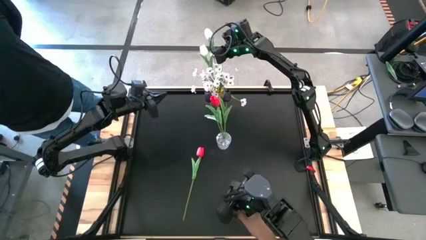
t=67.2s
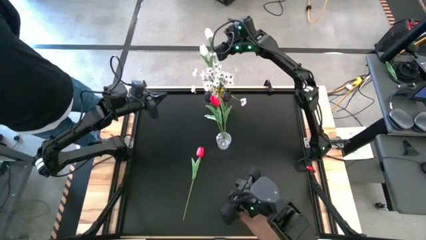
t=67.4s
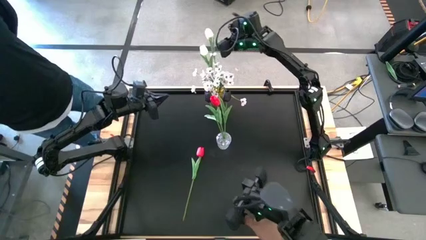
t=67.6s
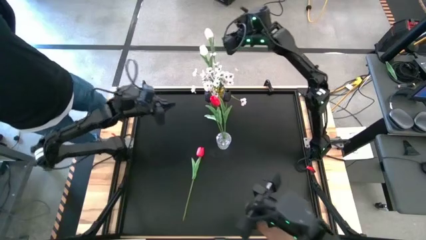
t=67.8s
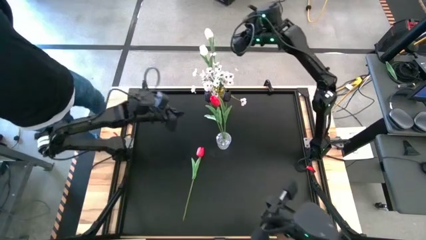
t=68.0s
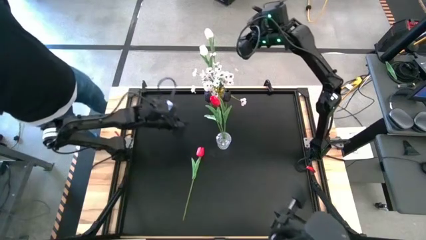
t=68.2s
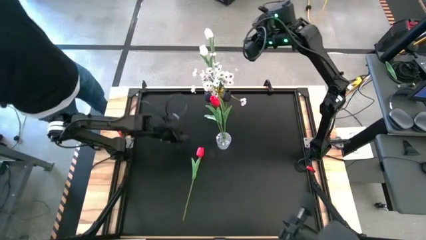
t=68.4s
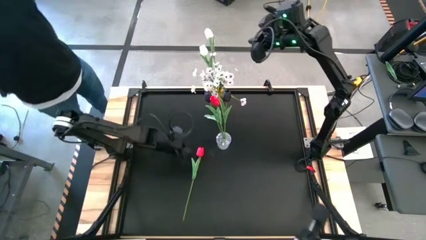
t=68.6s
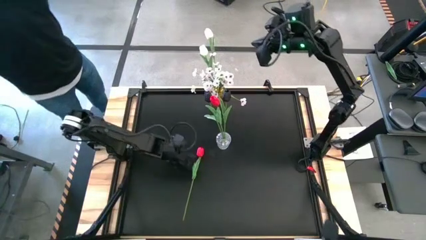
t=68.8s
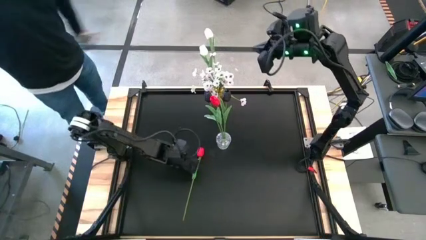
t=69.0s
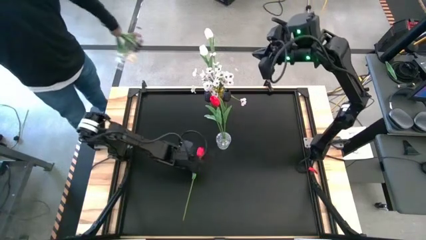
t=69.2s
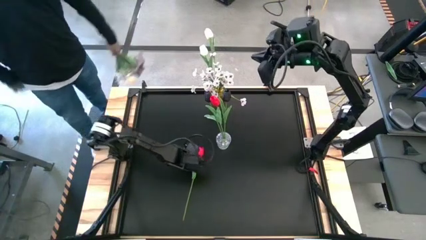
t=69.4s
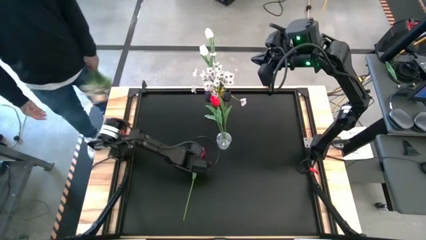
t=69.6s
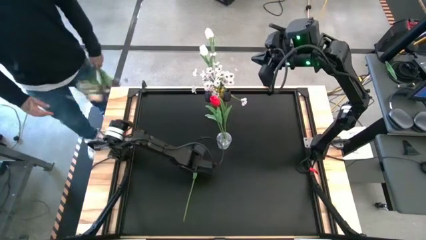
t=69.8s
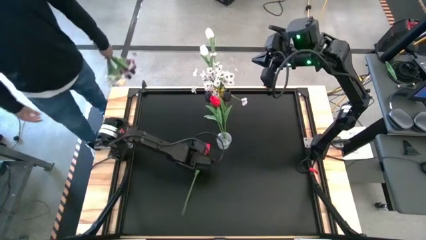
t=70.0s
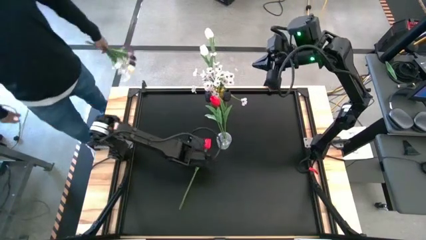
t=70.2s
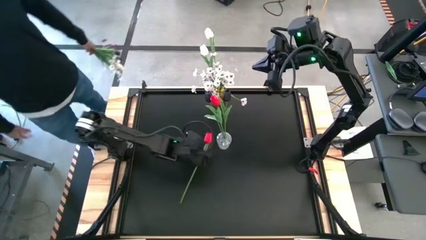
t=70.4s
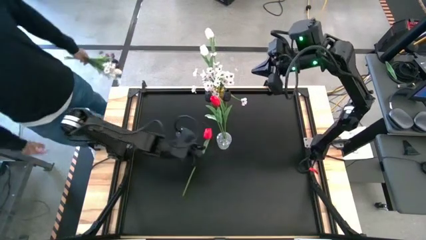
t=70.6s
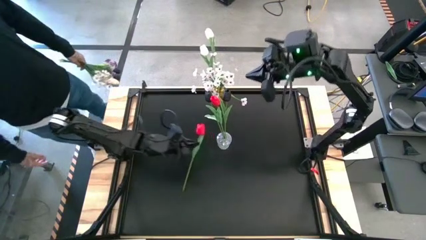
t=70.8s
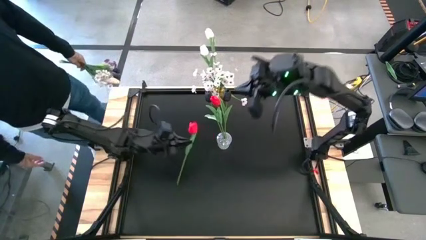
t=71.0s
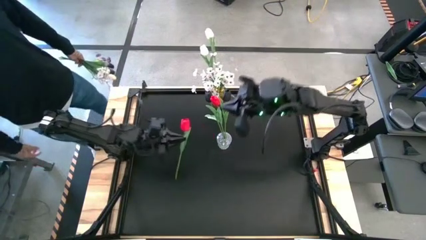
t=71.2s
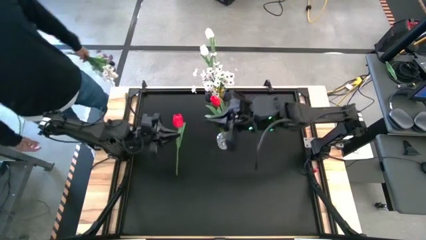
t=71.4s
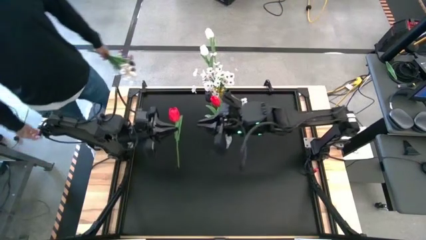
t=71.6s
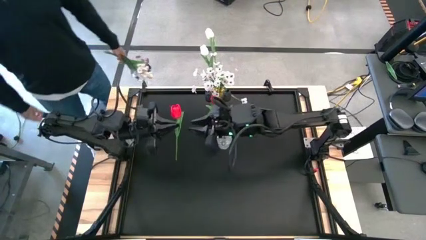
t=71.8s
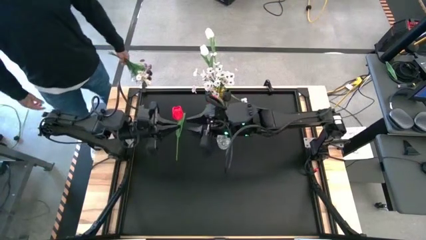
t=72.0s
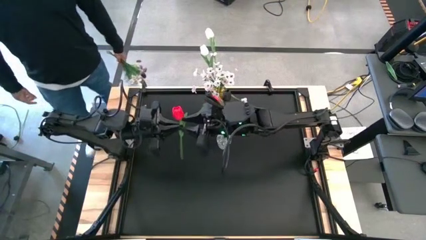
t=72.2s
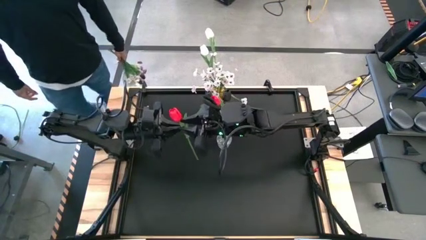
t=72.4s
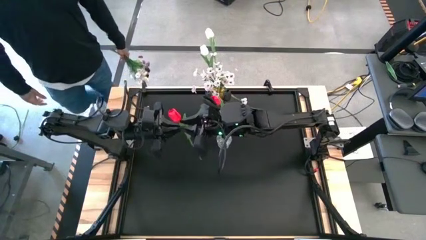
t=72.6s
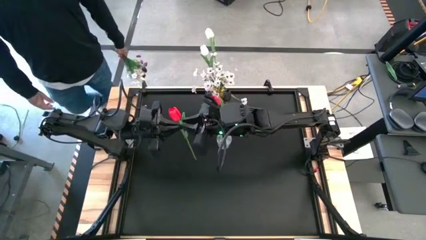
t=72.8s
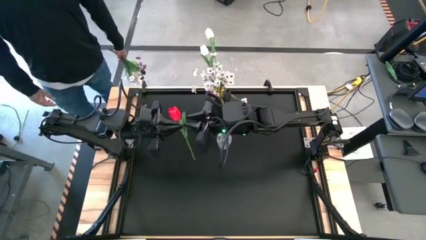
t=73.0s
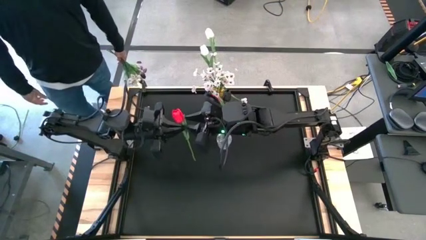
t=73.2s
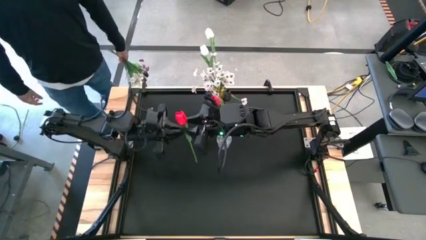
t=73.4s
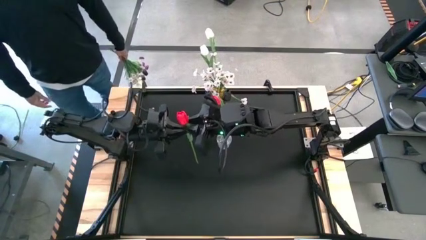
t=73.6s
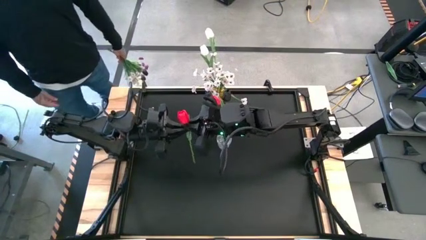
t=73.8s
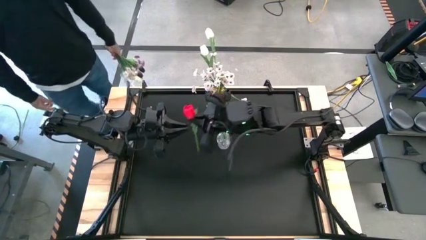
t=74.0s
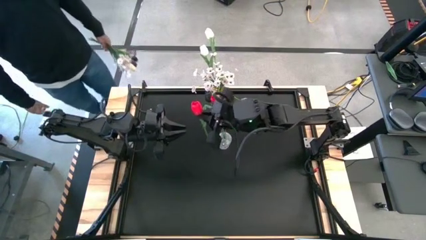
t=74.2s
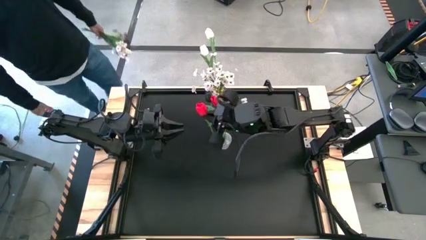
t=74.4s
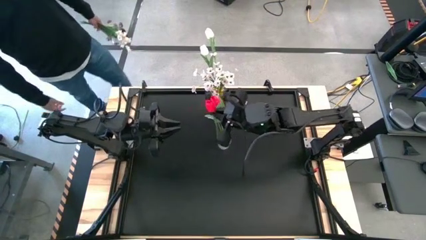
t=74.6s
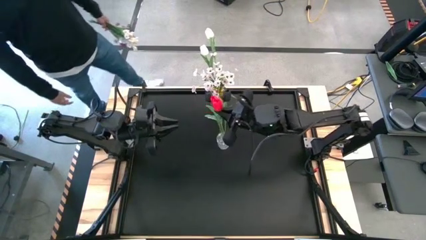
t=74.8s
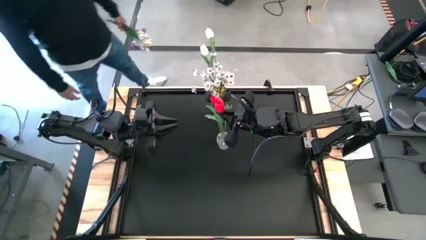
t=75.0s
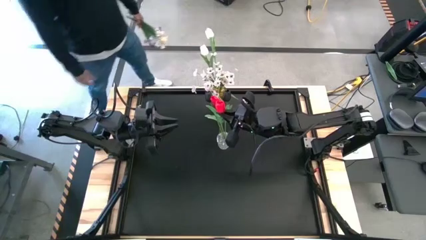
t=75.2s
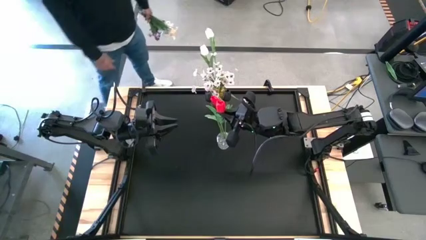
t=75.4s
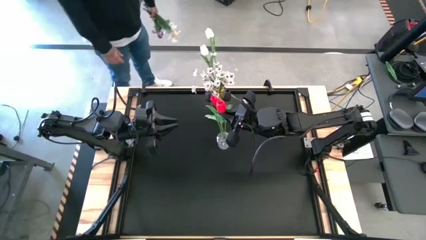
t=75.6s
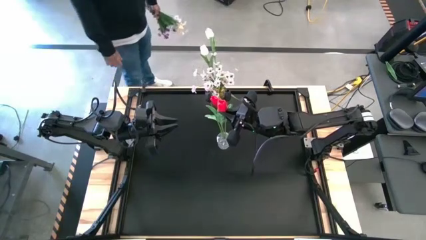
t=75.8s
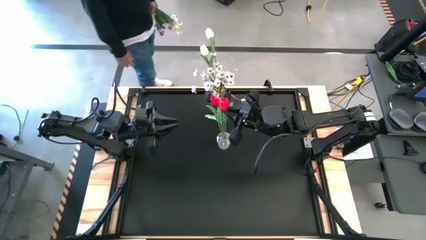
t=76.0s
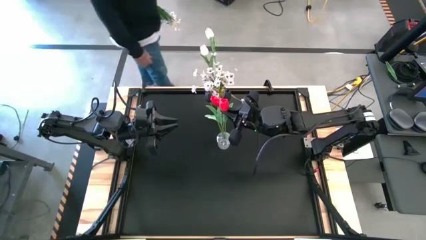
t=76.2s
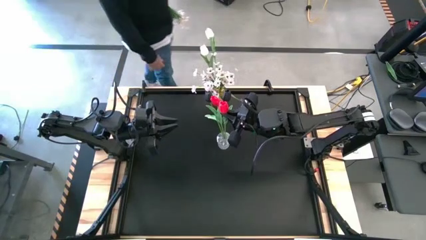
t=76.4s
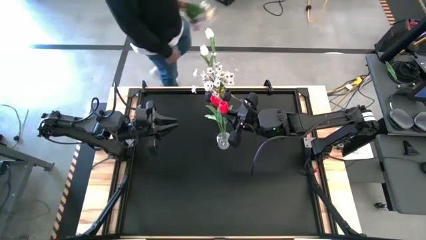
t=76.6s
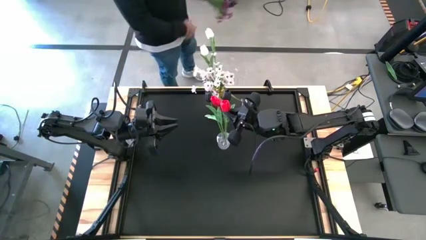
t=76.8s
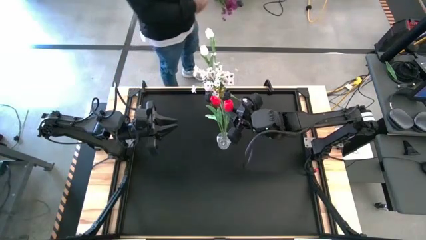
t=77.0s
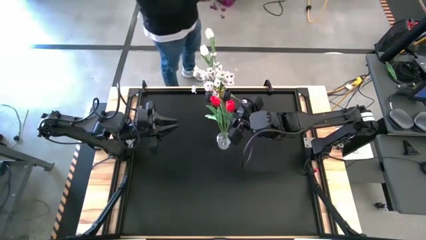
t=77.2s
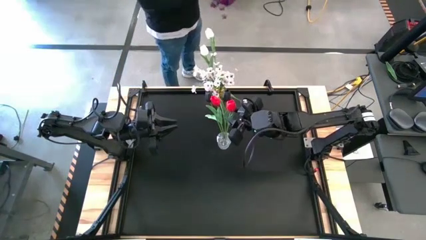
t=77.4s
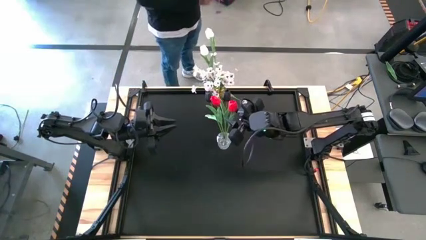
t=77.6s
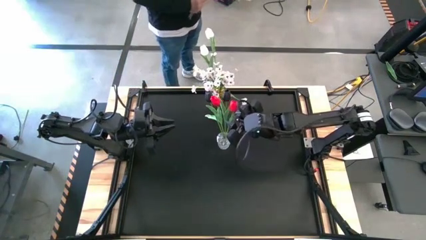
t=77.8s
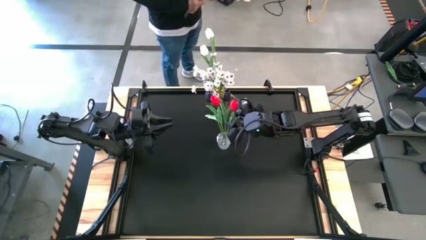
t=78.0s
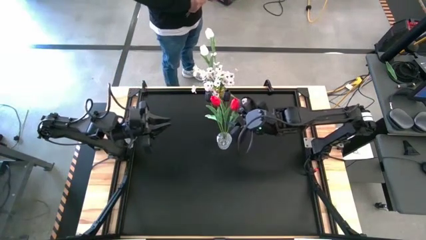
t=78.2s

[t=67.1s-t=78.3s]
Task: Sort flowers into vase by color
Put the red tulip into the transparent vase

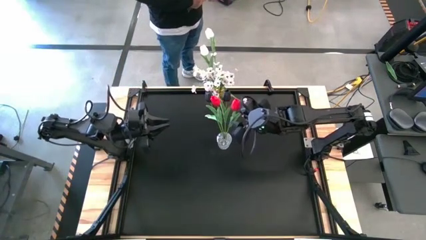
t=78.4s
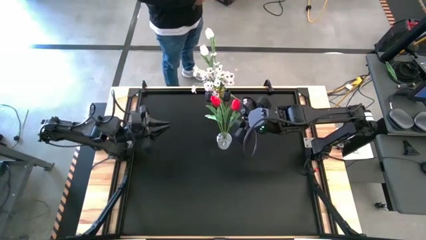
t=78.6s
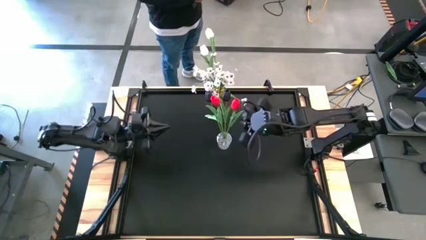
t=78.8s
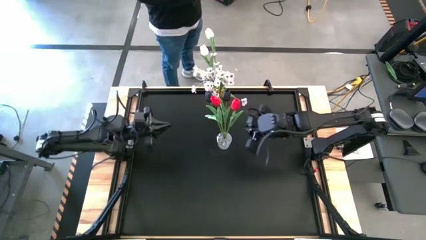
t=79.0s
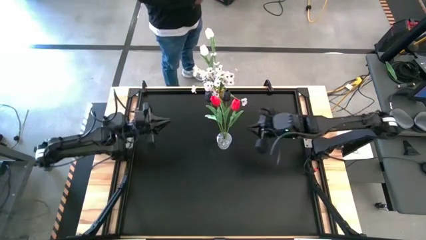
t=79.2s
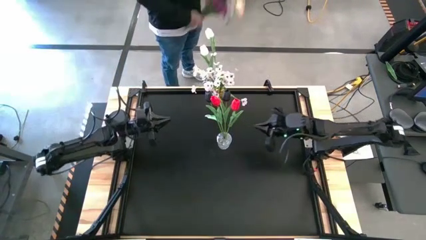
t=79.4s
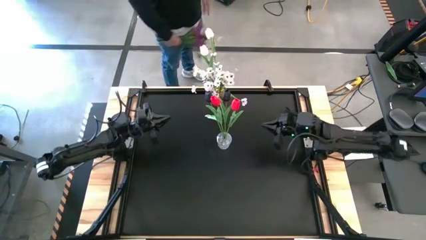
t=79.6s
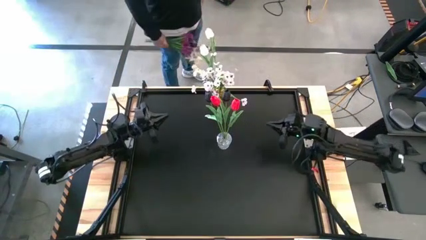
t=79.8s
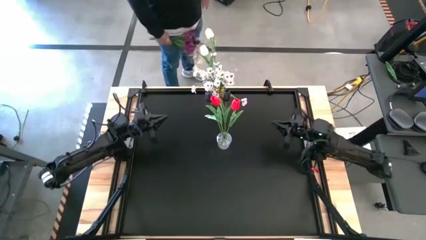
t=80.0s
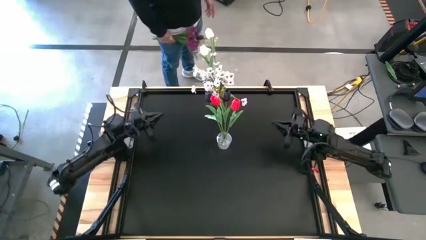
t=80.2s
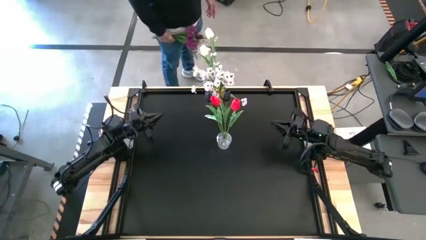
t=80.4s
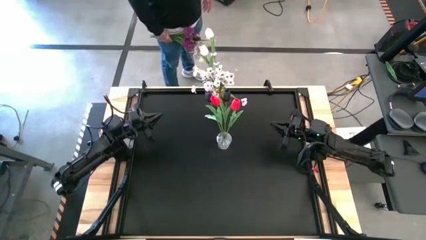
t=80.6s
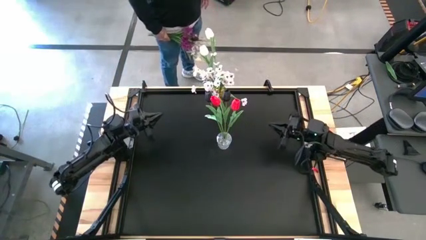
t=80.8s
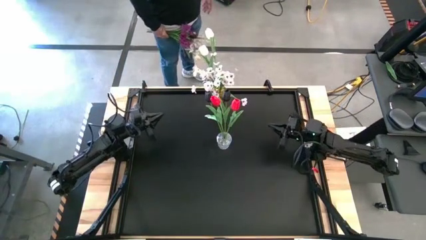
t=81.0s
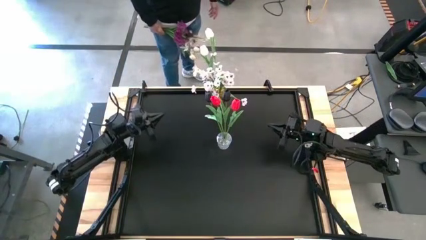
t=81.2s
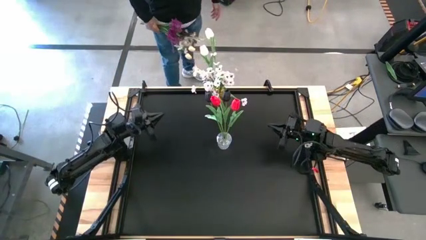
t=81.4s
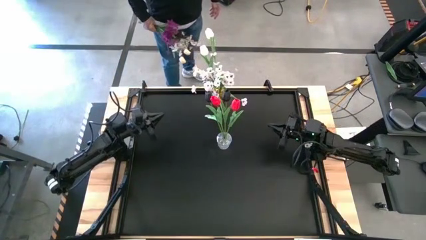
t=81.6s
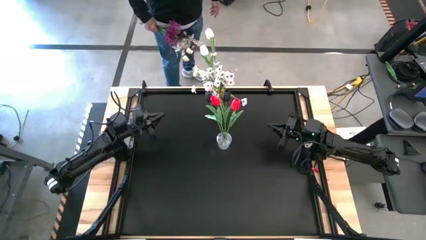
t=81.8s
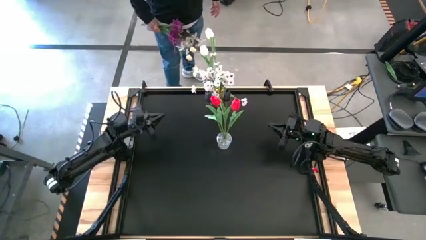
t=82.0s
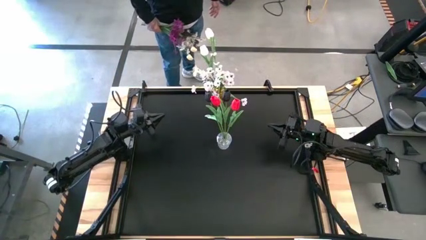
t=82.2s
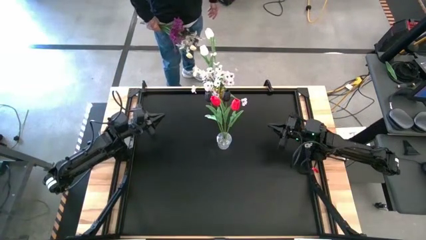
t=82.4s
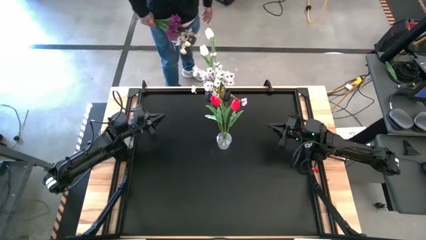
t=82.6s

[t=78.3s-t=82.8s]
Return to Home Position
